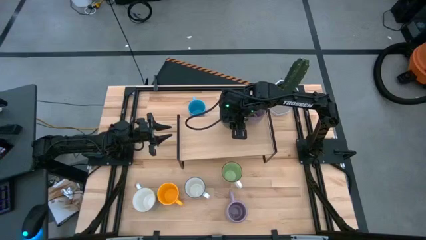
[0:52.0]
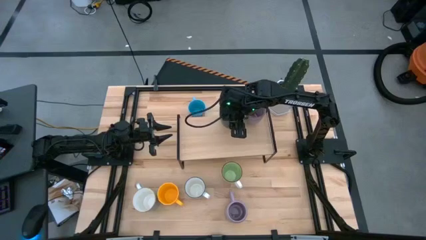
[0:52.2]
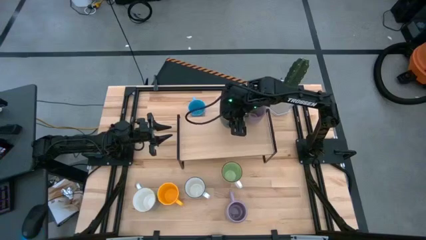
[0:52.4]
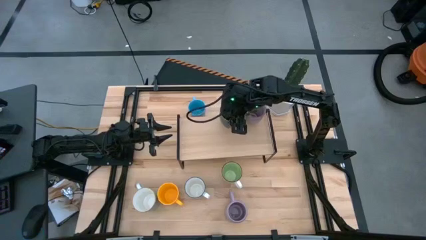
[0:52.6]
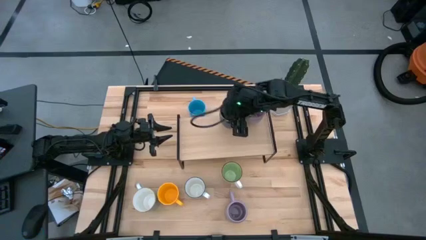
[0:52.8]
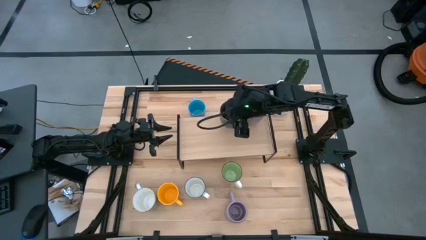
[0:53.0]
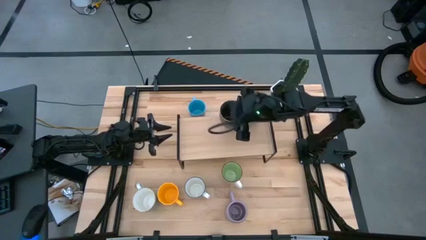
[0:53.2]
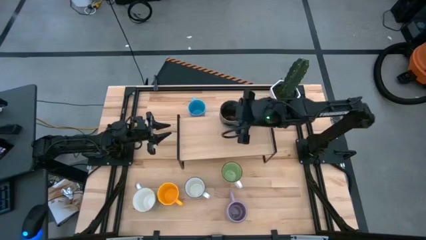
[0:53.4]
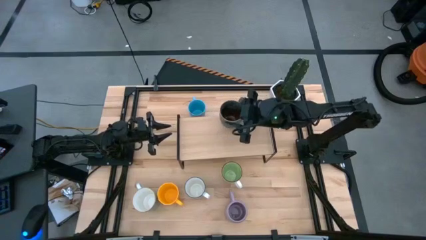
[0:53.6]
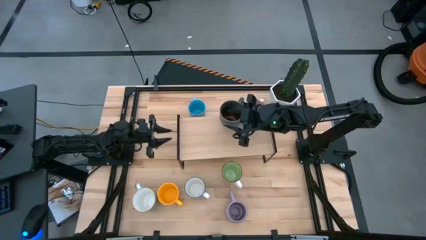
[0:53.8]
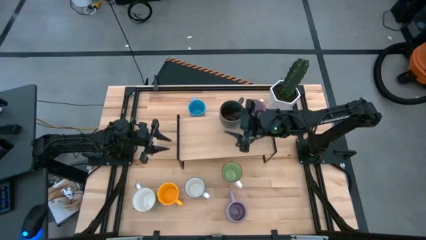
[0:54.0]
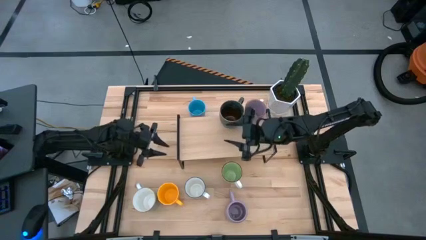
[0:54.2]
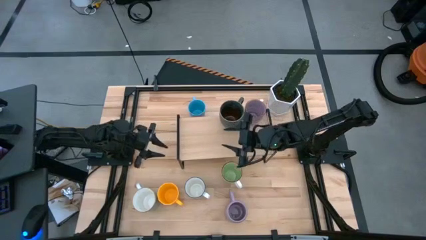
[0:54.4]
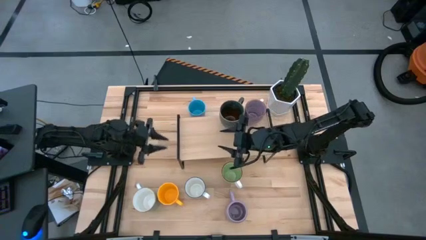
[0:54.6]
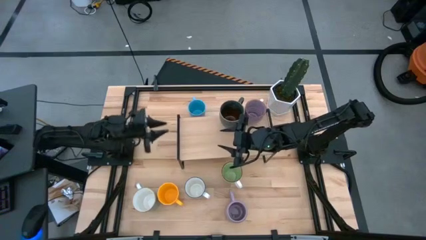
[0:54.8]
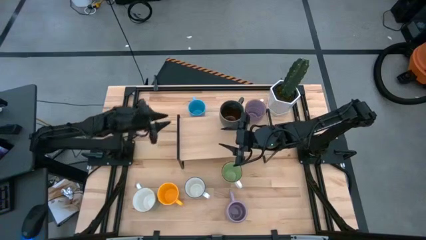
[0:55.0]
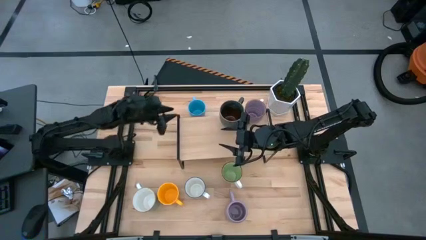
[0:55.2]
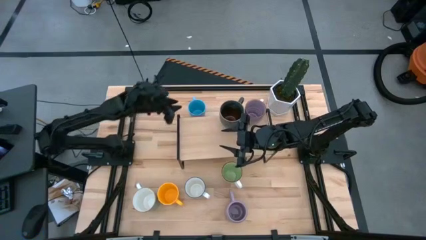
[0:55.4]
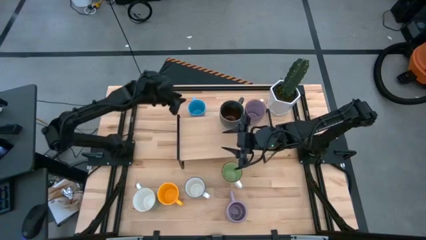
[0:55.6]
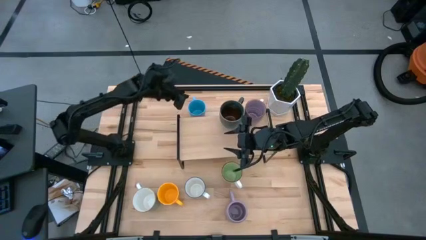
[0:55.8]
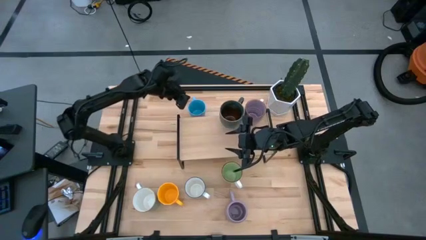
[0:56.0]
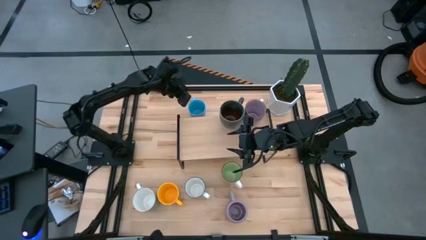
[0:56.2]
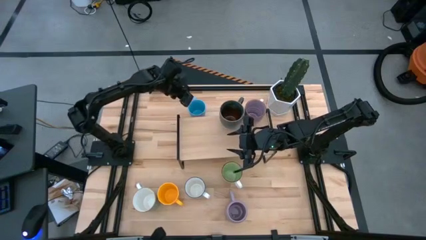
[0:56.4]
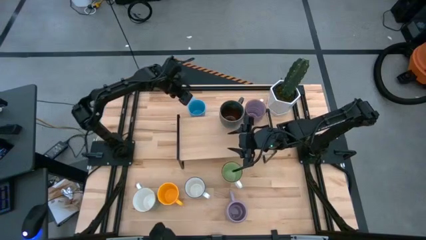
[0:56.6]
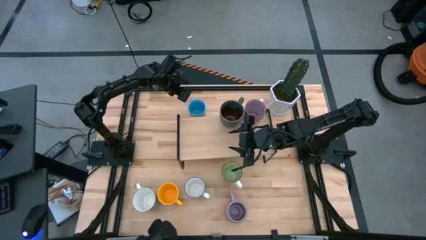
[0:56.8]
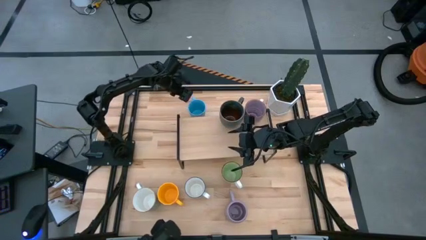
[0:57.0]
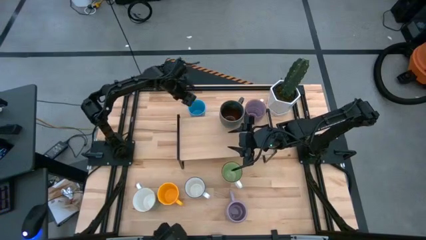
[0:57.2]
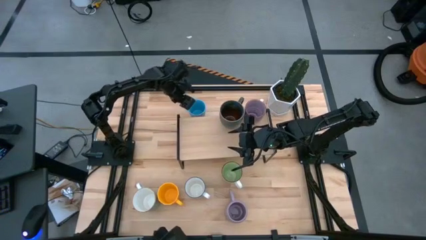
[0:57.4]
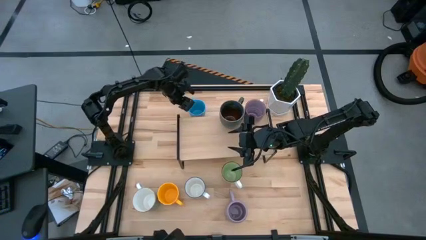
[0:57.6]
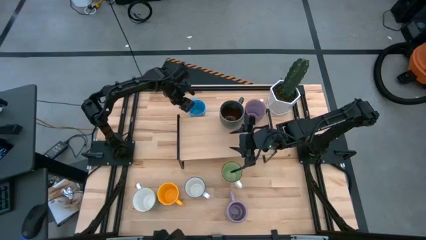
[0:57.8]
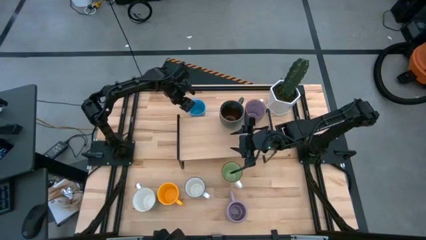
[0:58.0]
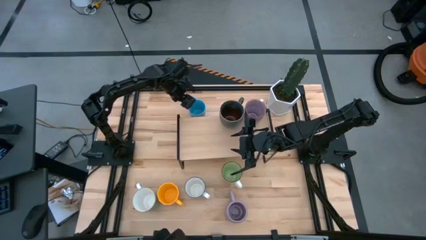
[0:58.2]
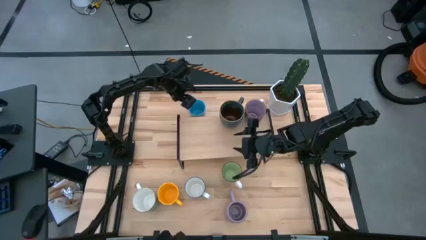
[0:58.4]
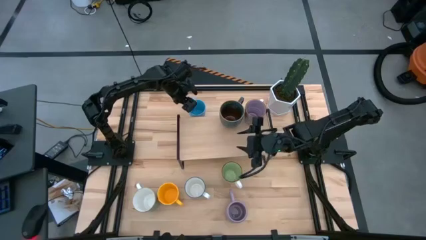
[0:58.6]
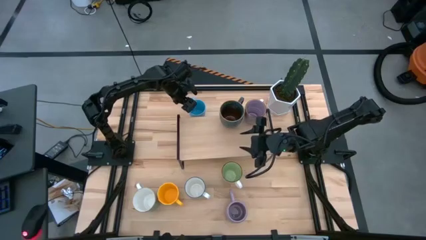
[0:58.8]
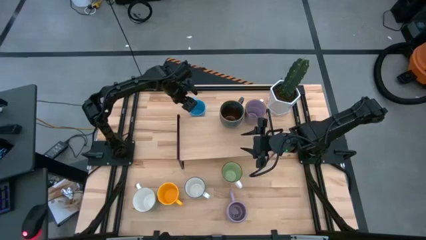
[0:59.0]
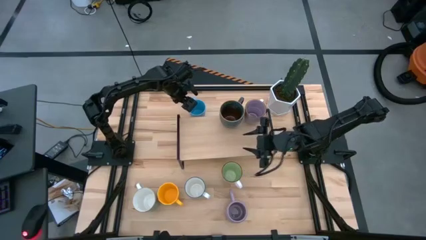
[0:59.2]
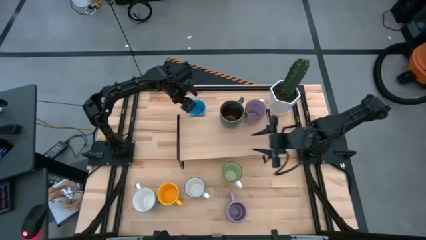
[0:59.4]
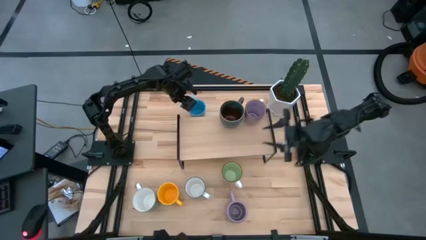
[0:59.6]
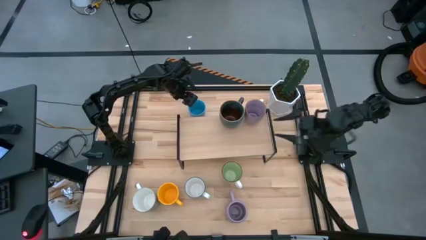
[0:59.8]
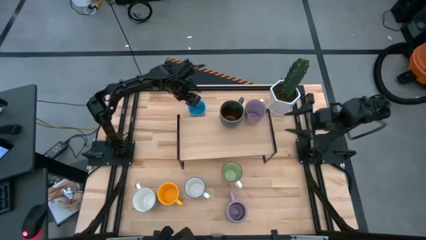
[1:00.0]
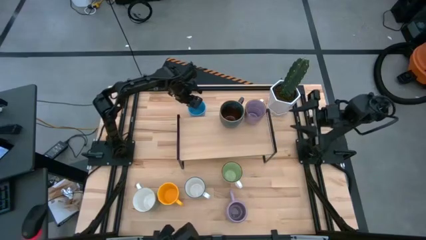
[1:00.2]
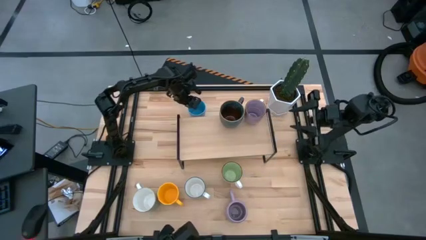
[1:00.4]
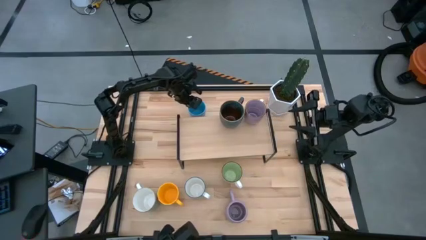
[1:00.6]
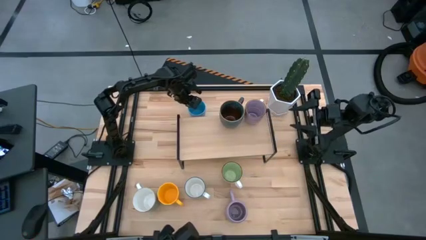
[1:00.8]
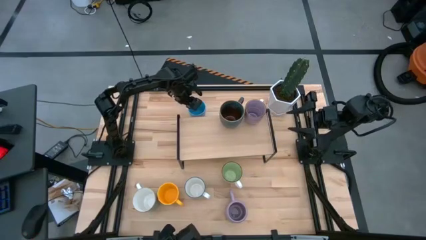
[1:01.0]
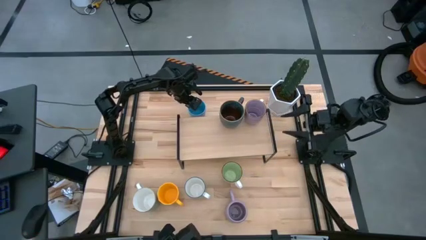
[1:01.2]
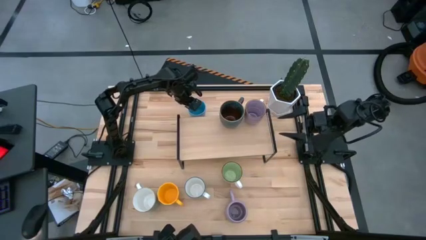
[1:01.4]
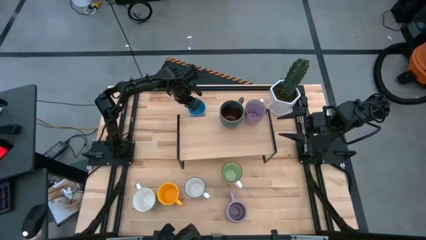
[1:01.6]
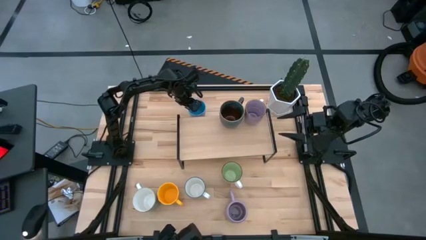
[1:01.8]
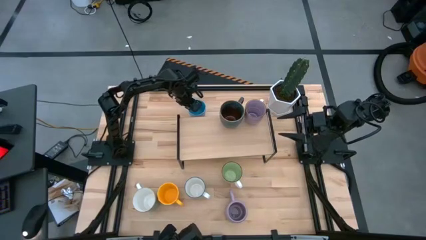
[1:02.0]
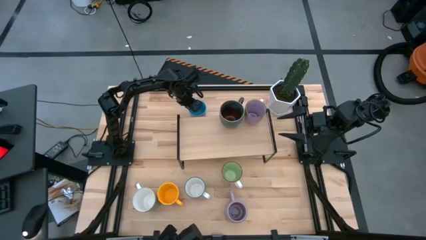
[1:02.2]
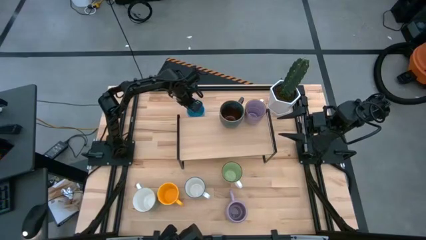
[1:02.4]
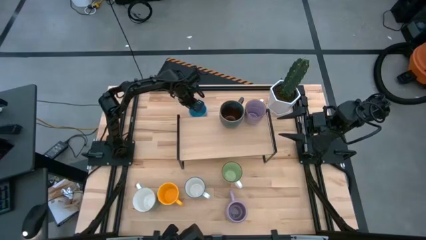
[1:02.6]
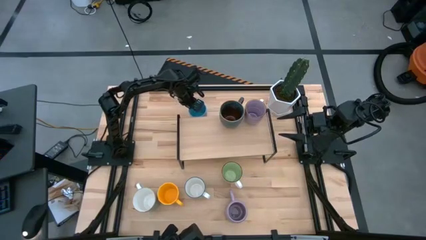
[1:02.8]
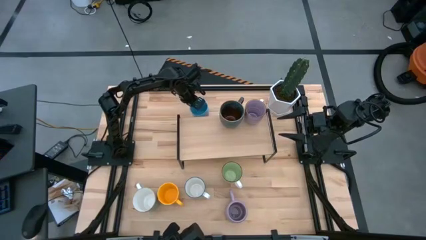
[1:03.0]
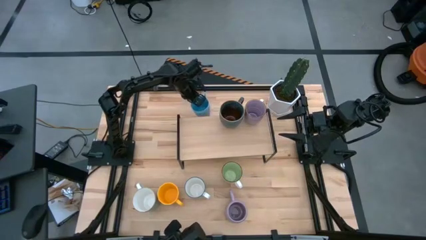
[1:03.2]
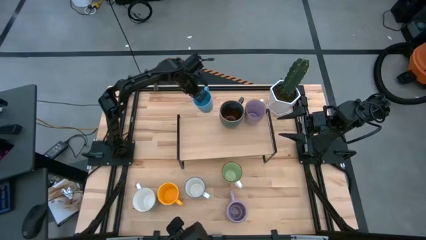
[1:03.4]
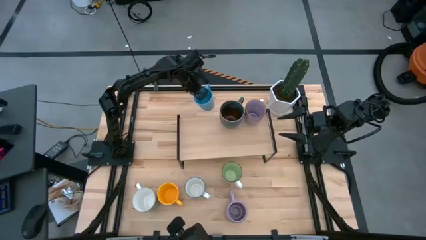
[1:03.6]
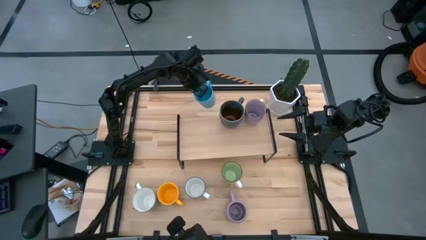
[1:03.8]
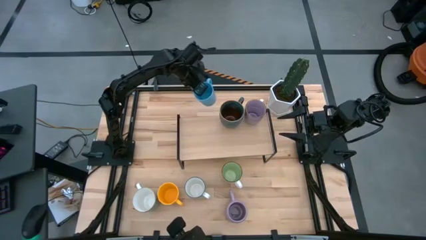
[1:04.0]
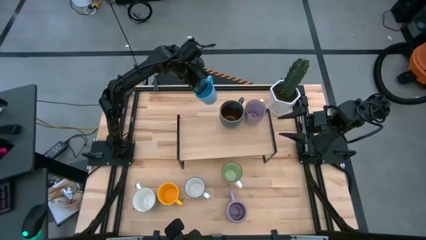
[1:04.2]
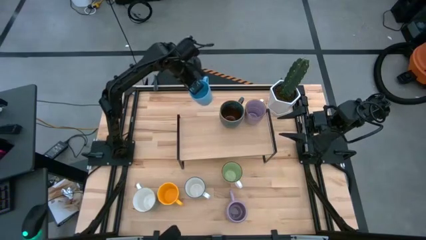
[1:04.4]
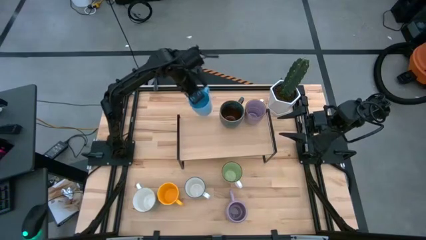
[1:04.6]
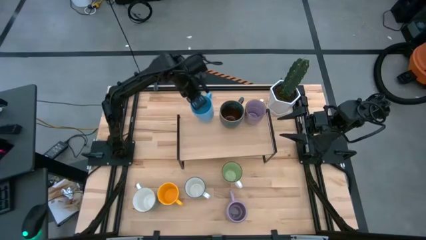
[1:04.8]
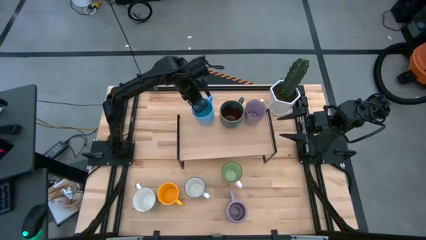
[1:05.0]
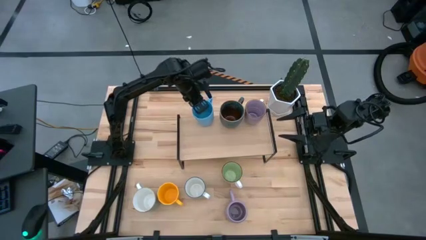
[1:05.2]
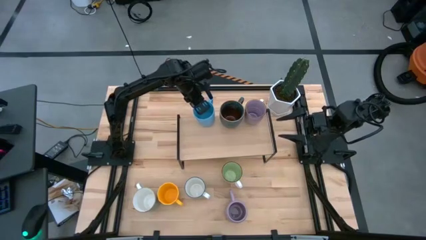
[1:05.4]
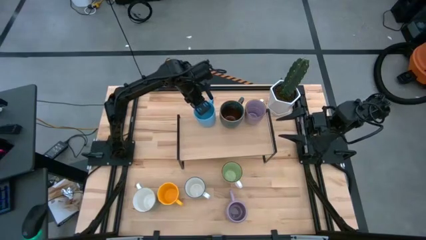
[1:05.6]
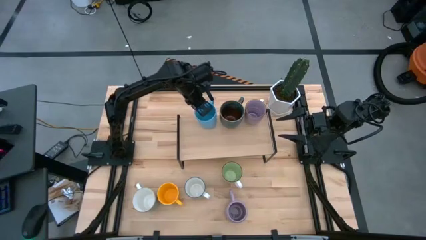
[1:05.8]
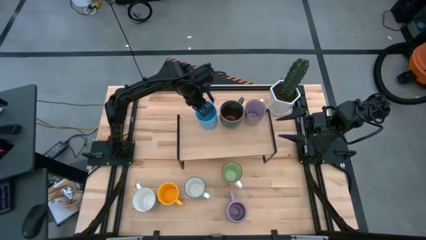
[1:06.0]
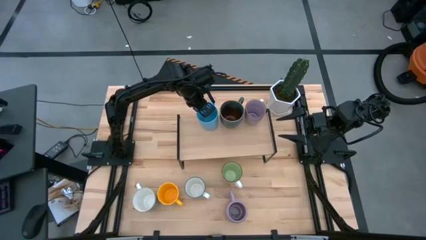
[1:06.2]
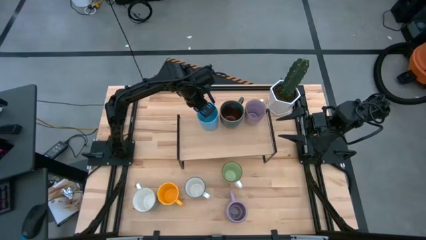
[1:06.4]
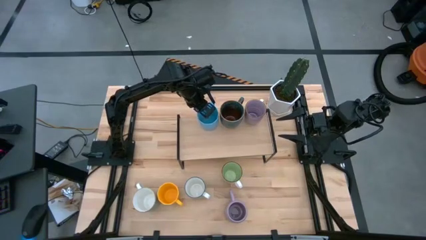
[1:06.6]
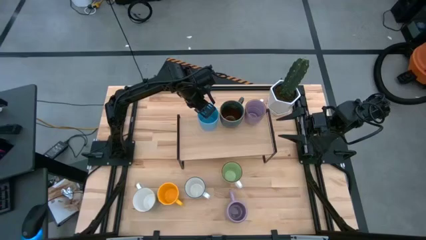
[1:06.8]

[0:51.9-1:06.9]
Task: Place coffee mugs
Put the blue mug on the shelf
